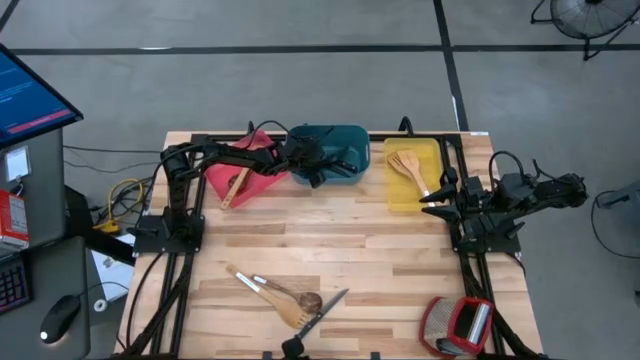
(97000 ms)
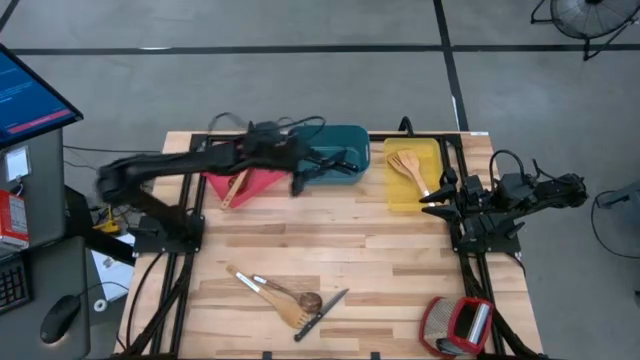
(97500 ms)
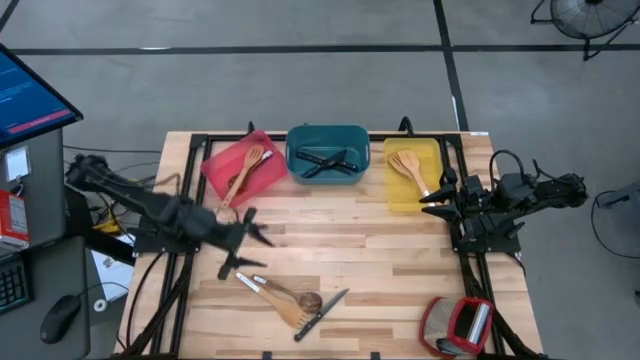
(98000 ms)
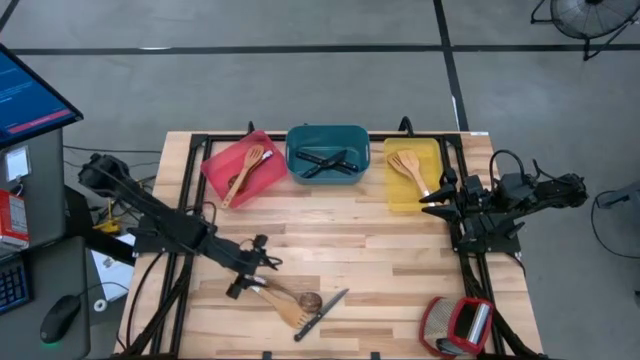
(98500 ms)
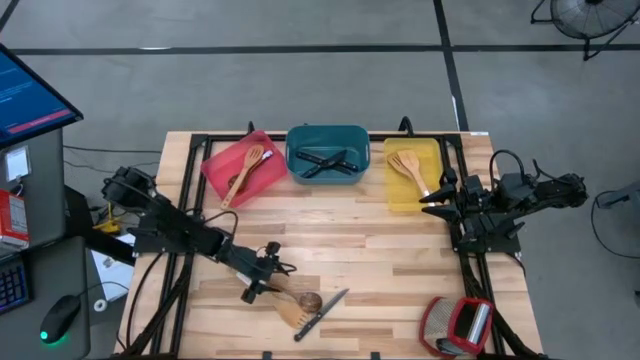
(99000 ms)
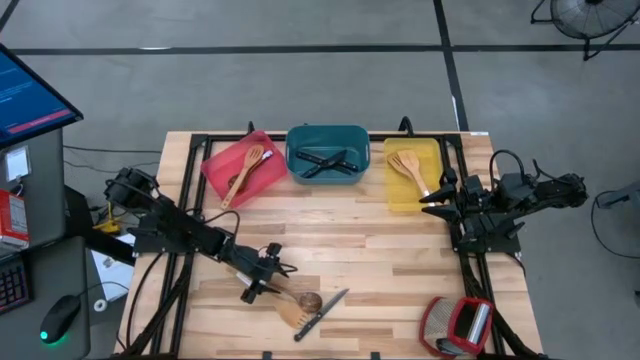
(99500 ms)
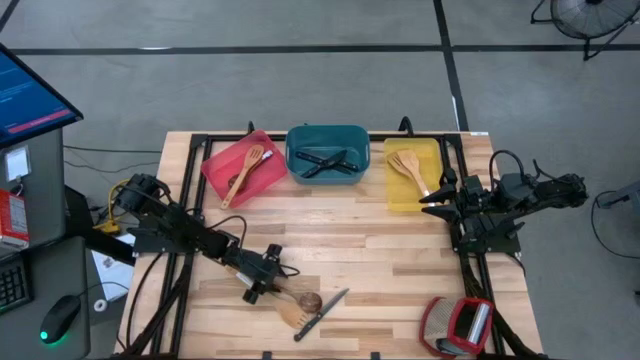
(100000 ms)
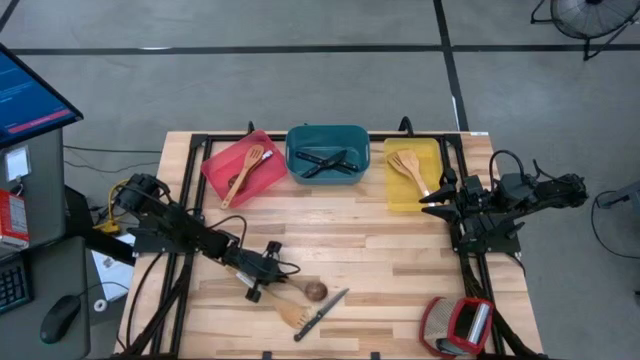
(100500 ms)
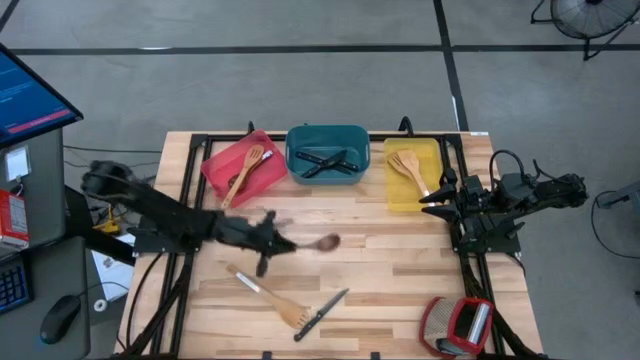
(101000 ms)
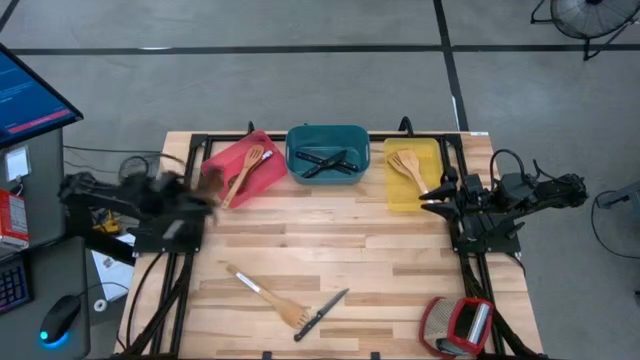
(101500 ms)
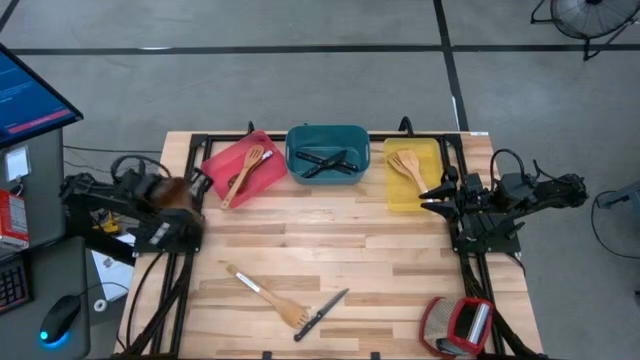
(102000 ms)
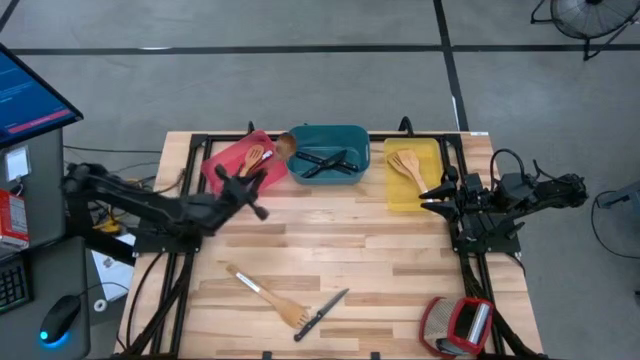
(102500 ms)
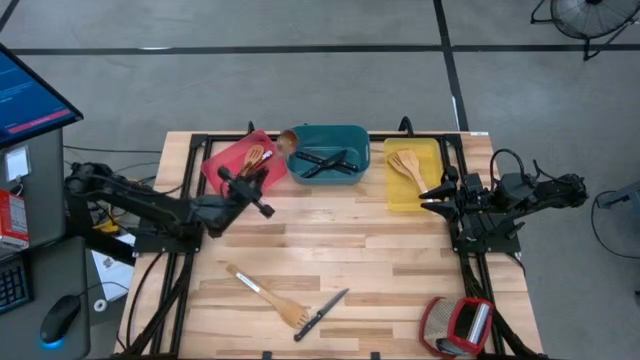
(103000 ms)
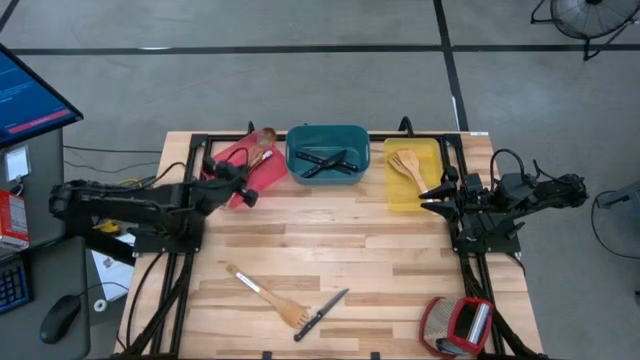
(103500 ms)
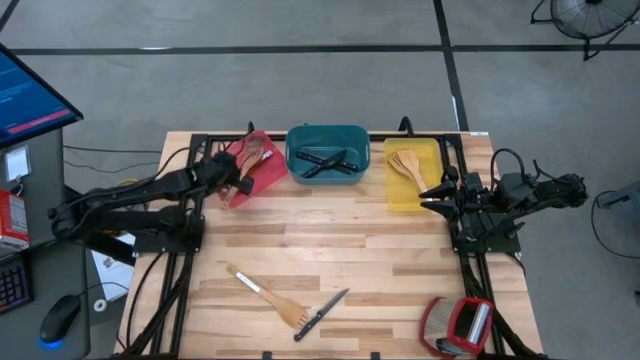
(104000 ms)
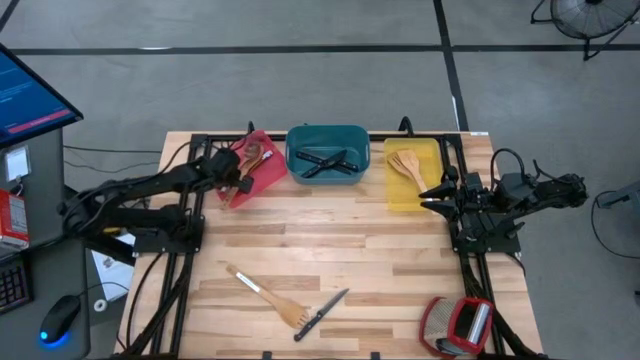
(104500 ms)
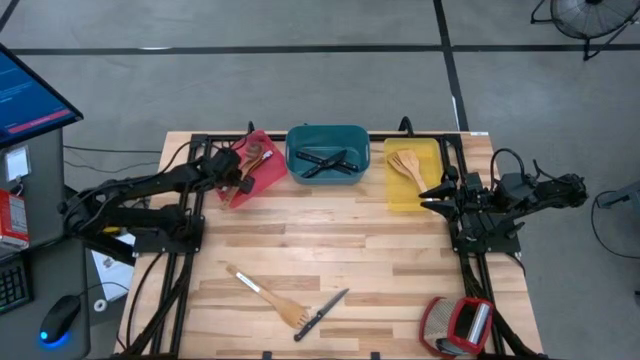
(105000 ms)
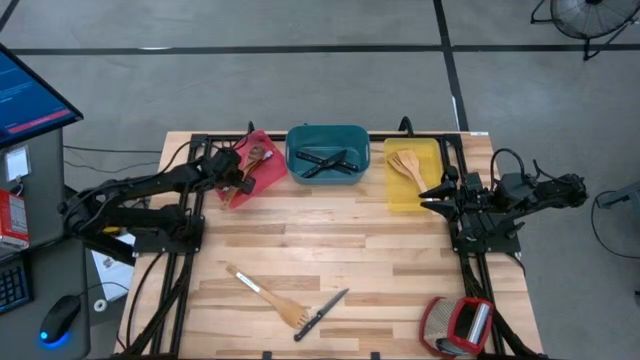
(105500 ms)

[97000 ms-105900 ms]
Task: Pick & Place Kitchen Items
Put the wooden serving spoon into the red bin

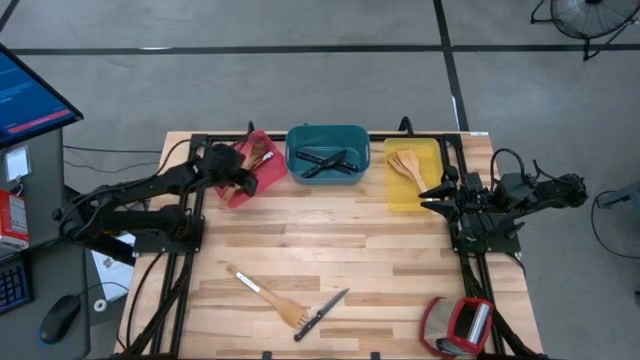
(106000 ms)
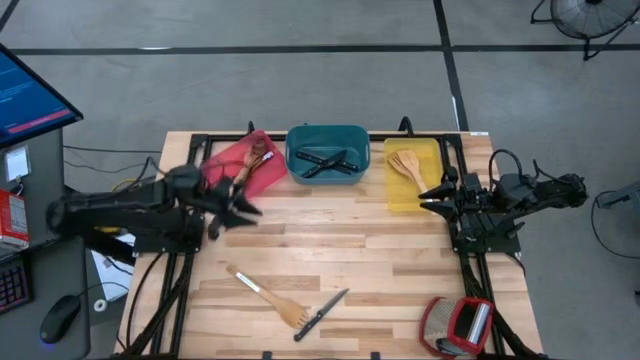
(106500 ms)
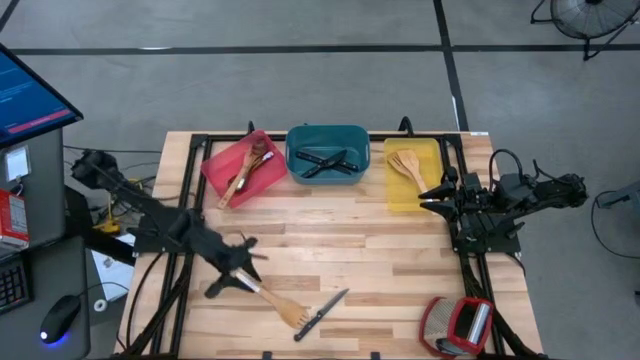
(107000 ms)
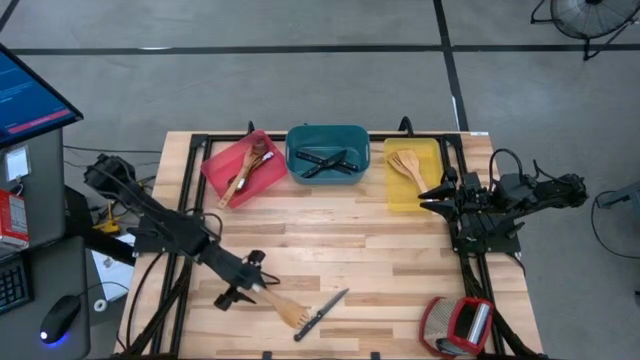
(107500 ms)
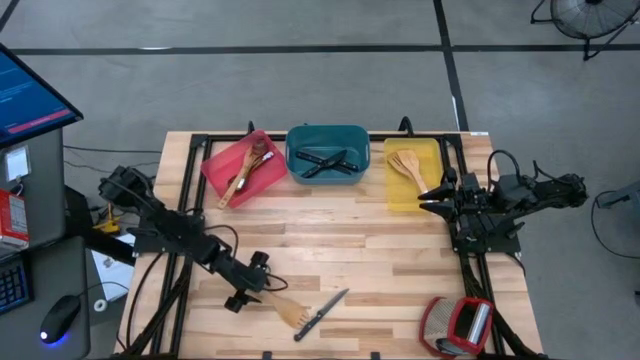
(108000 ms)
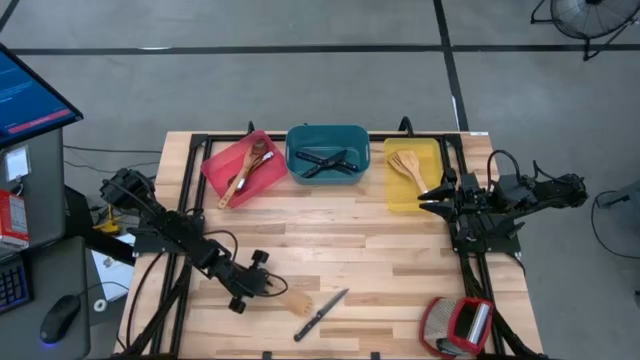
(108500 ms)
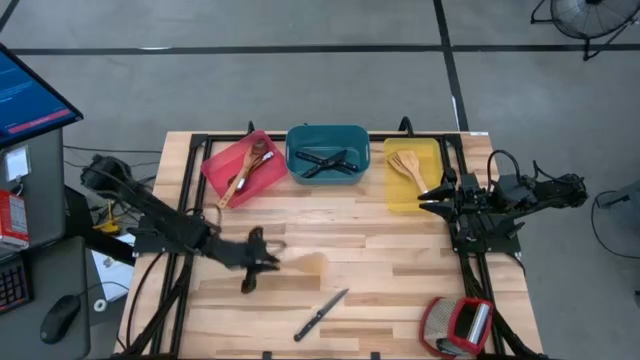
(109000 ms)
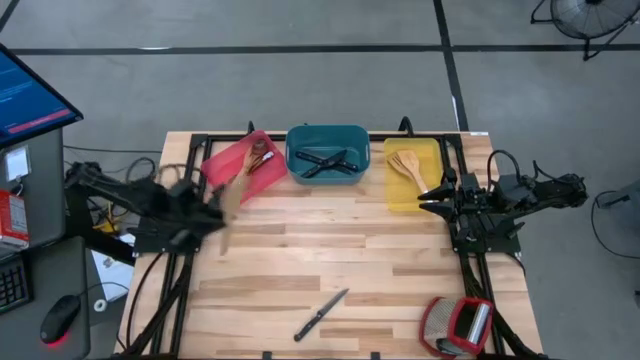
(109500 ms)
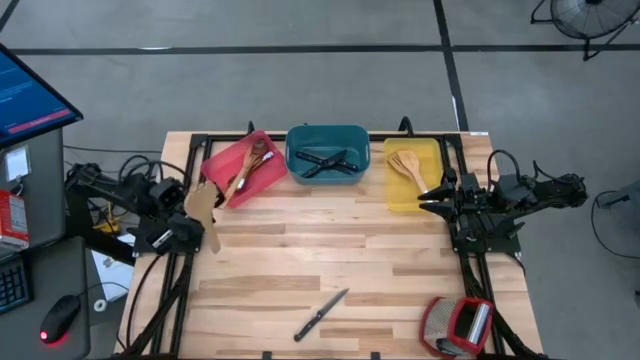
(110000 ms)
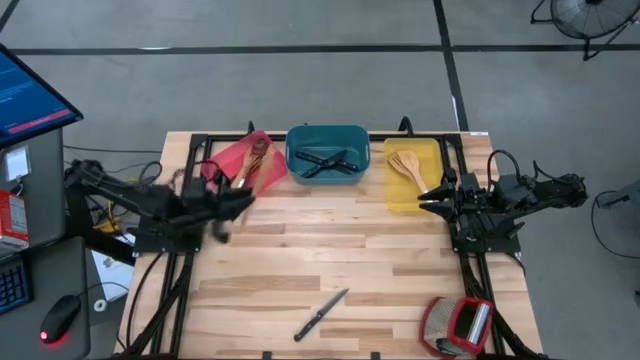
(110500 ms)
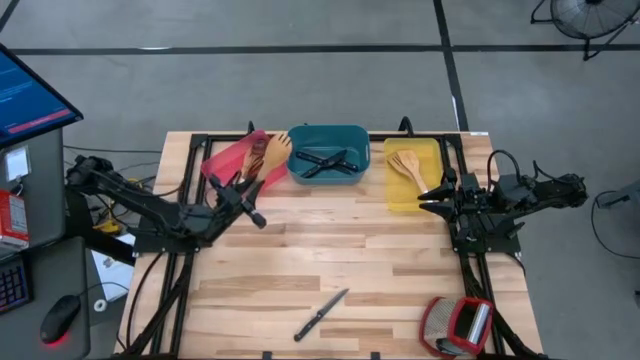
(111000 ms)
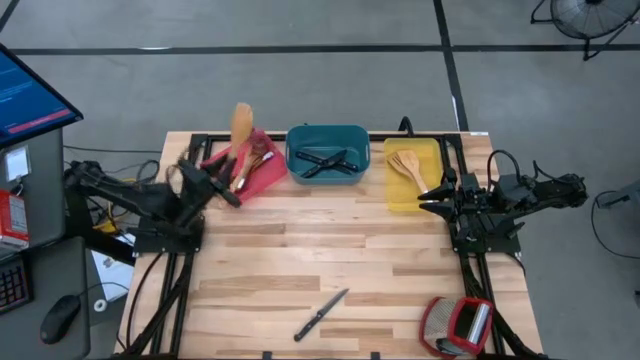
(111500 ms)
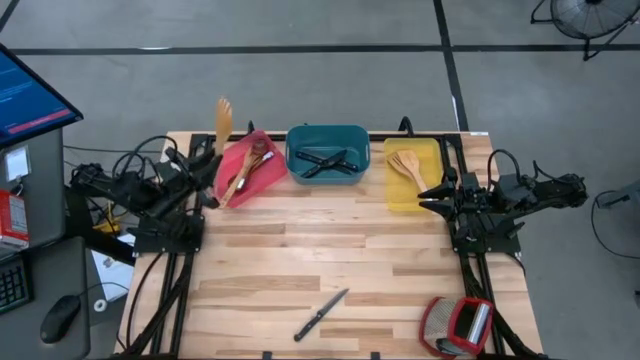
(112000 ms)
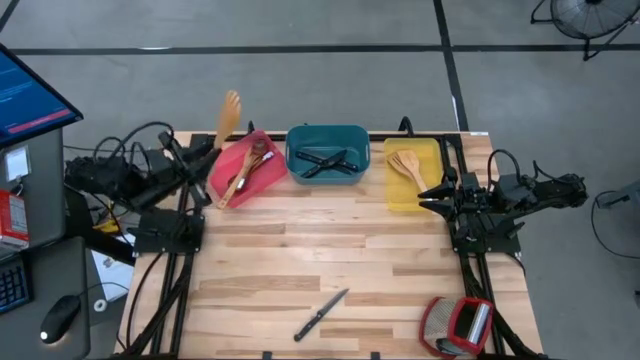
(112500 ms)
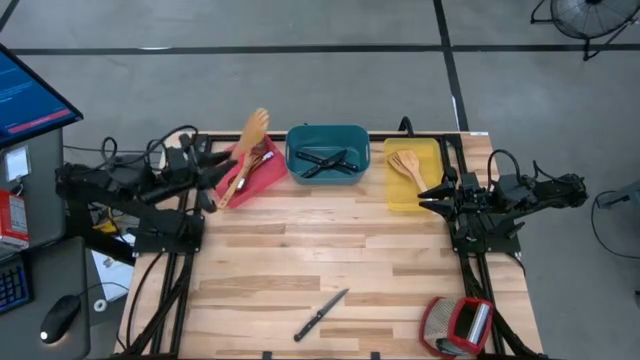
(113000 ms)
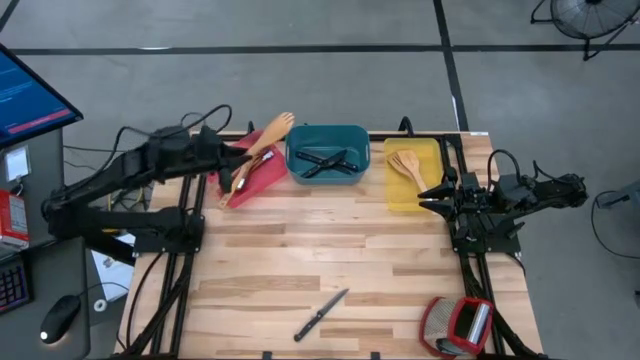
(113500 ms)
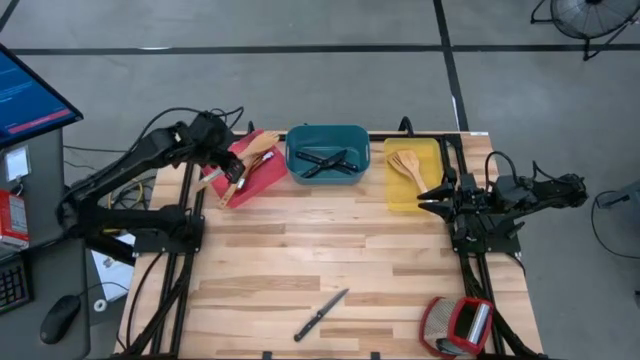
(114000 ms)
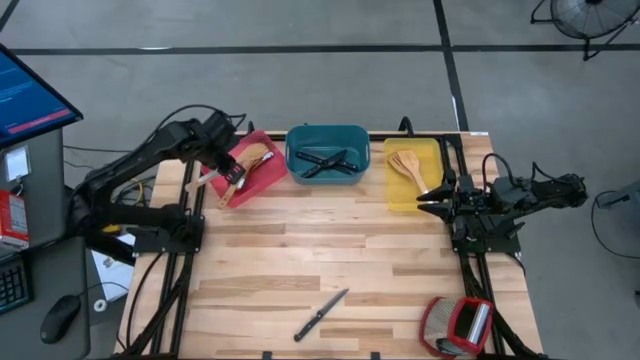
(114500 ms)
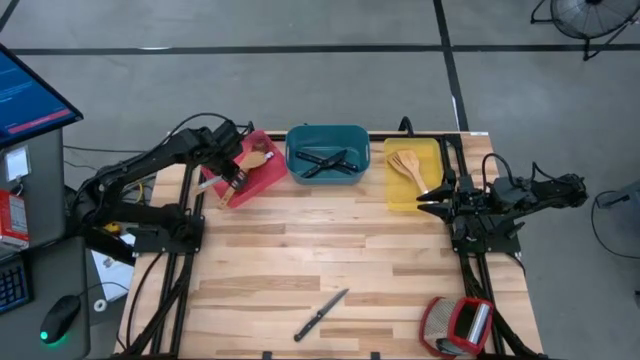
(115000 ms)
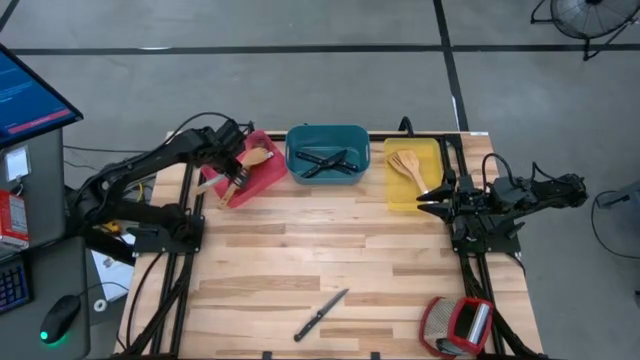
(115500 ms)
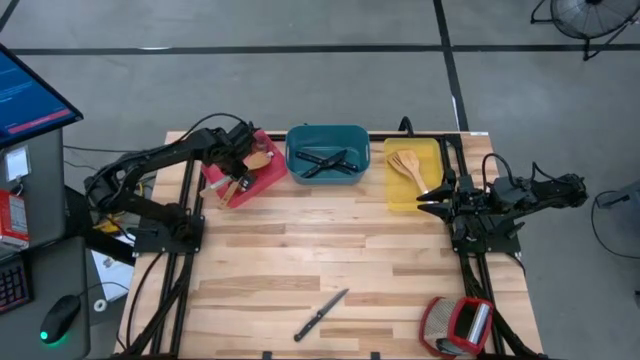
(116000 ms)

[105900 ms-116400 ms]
Put the wooden serving spoon into the red bin

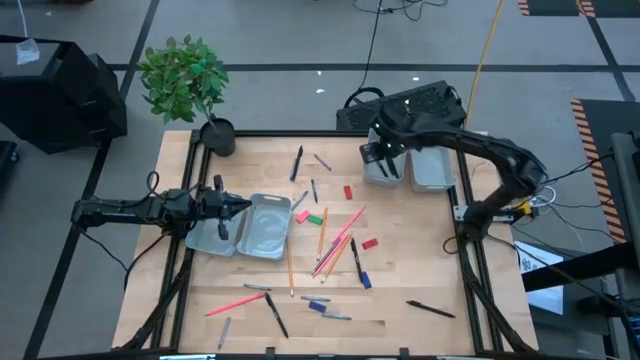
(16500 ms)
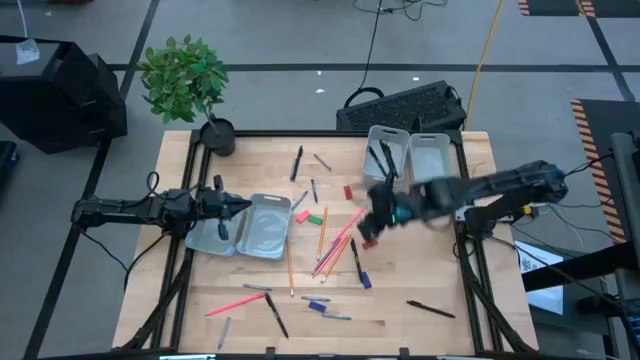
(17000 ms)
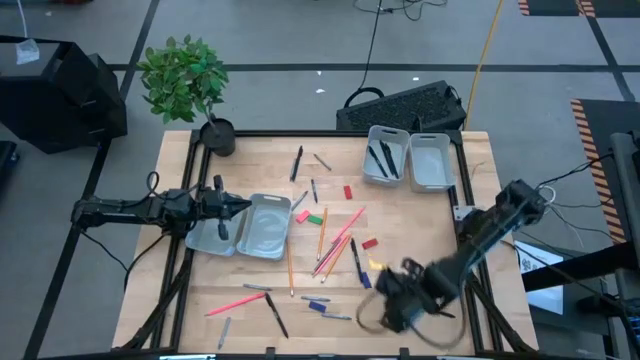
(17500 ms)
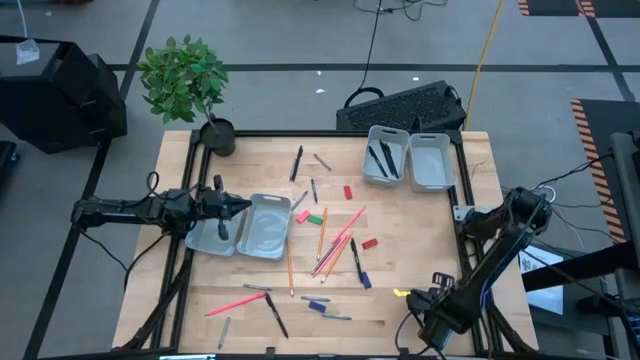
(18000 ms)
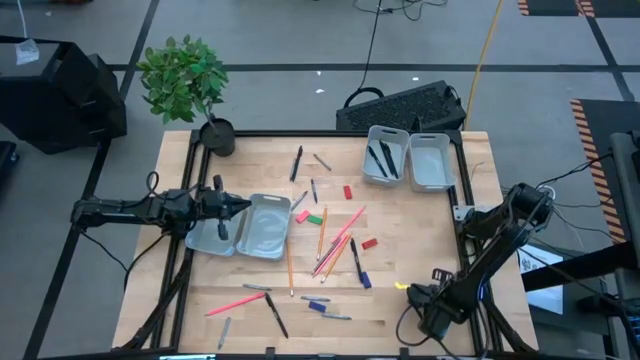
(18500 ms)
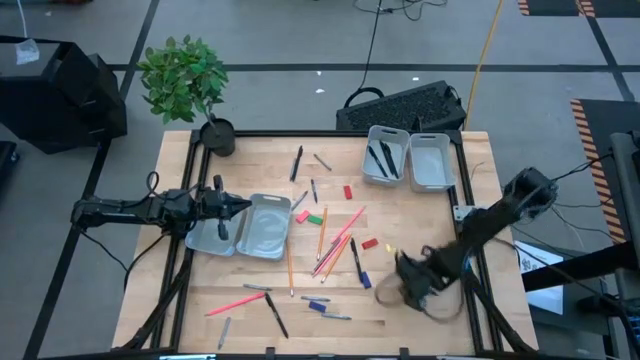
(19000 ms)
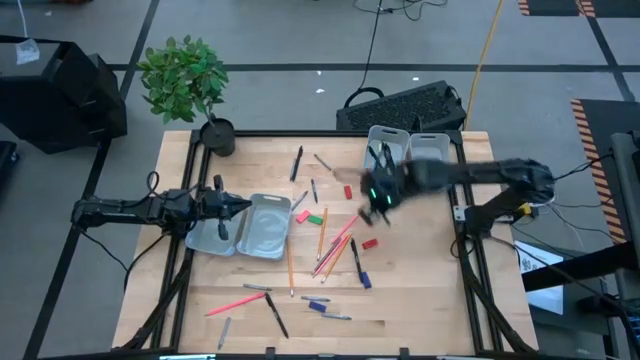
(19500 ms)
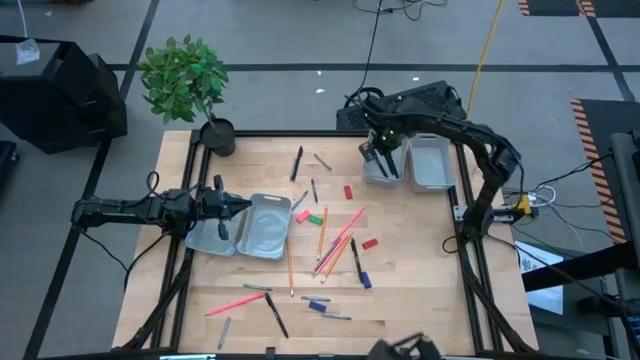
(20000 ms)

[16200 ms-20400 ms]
Task: Sort crayons/erasers/pens/pencils in bins
Put the black pen into the top left gray bin
